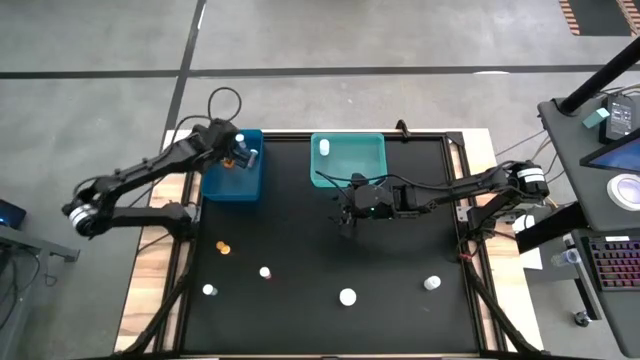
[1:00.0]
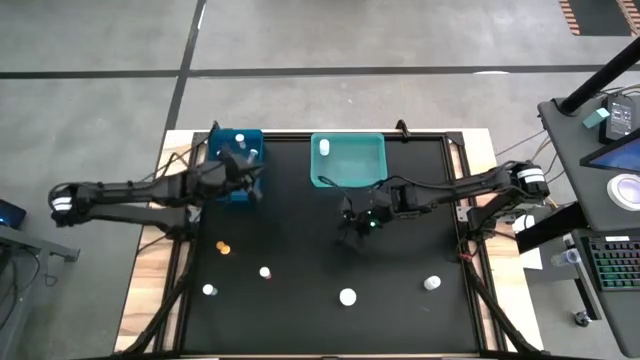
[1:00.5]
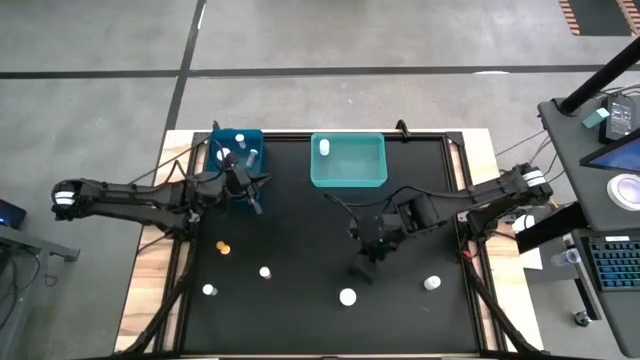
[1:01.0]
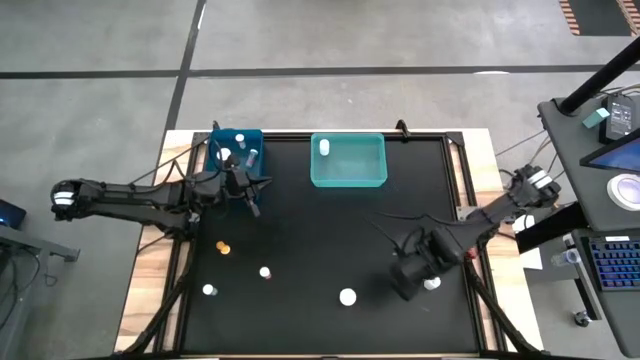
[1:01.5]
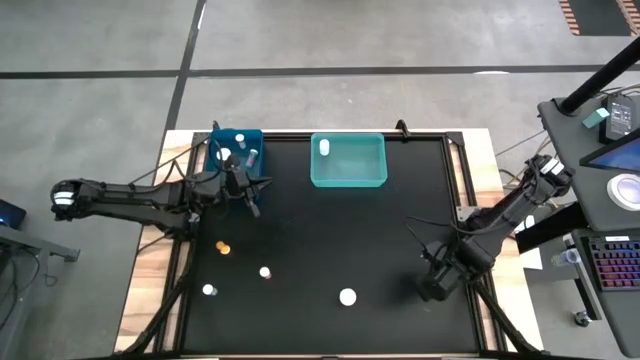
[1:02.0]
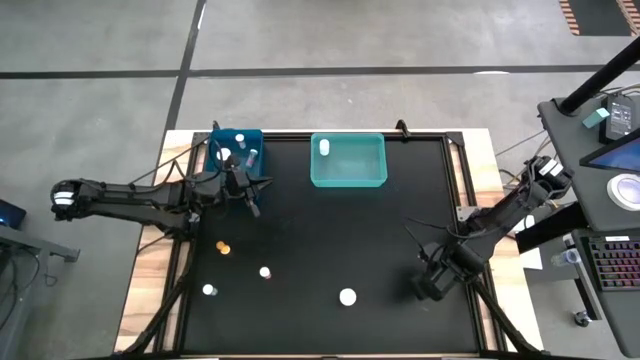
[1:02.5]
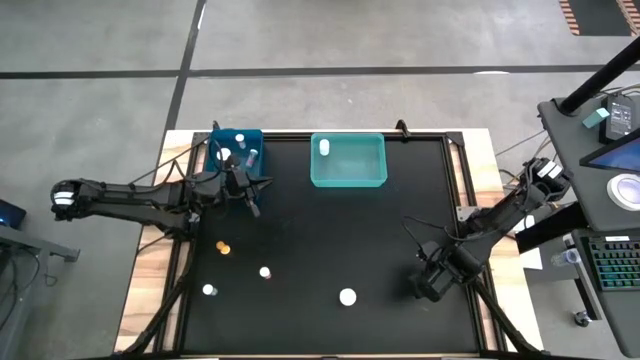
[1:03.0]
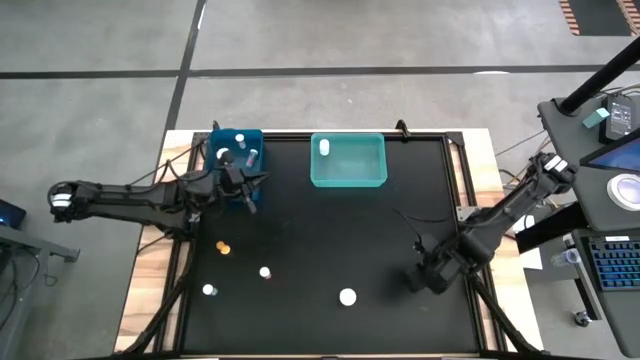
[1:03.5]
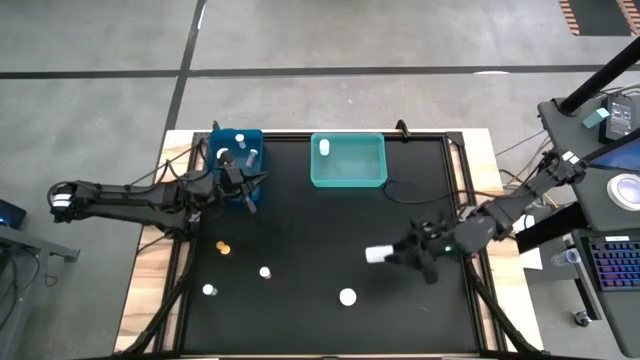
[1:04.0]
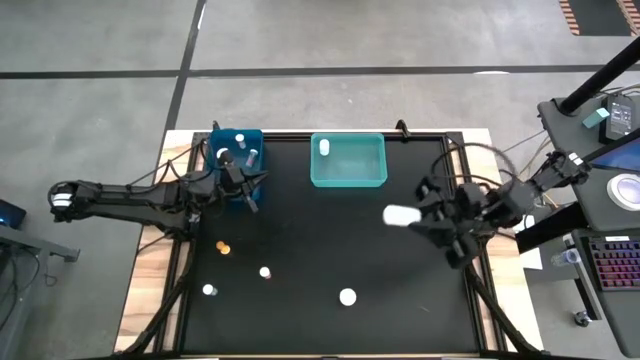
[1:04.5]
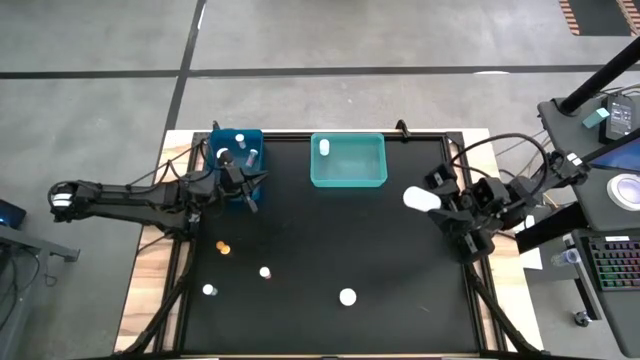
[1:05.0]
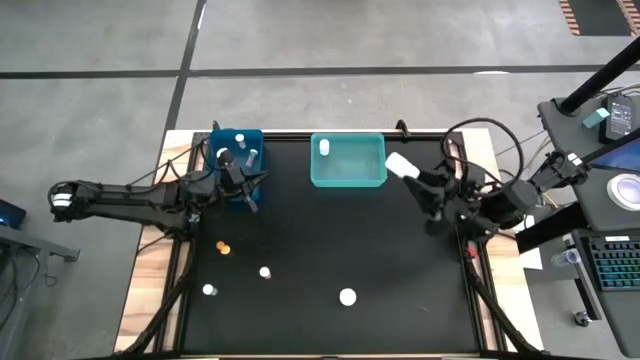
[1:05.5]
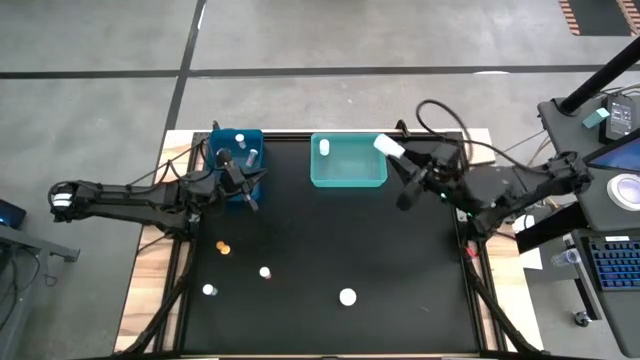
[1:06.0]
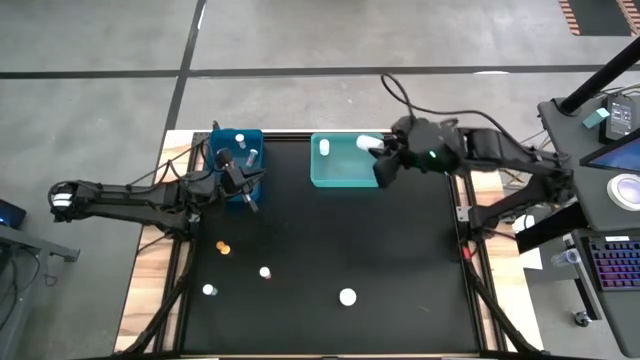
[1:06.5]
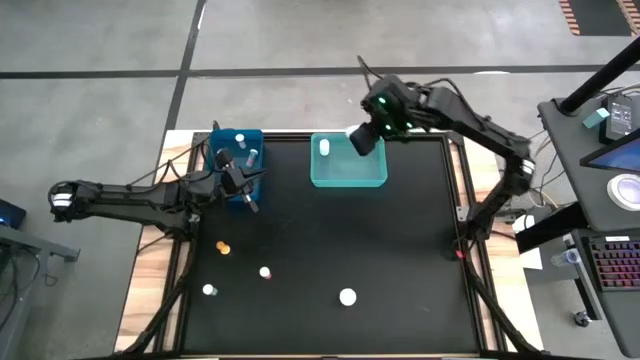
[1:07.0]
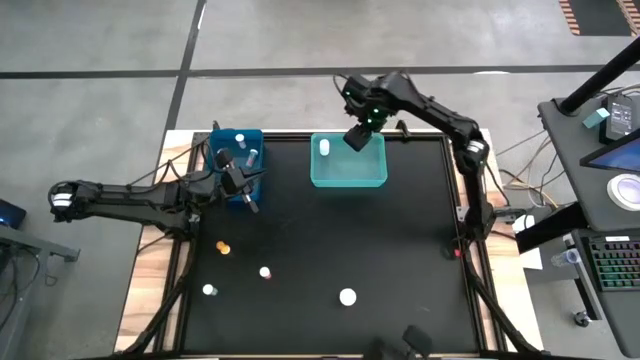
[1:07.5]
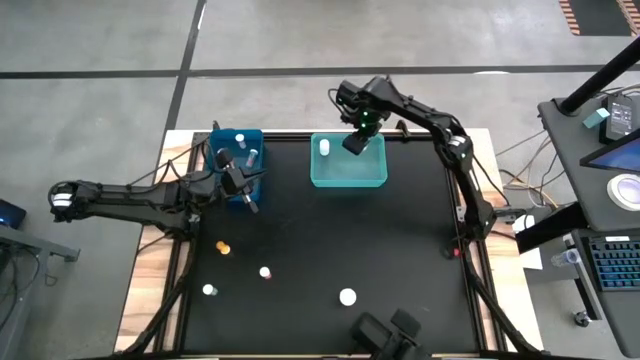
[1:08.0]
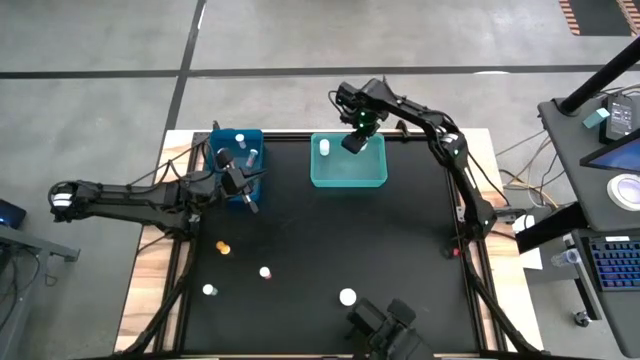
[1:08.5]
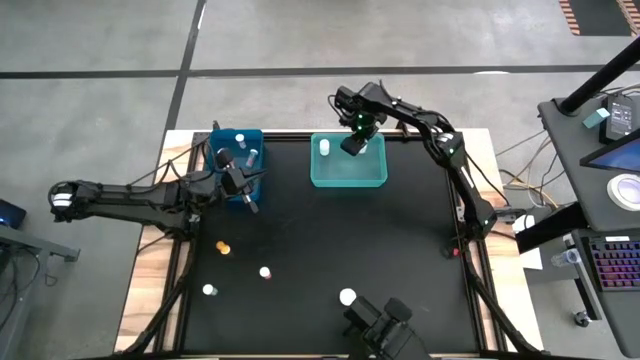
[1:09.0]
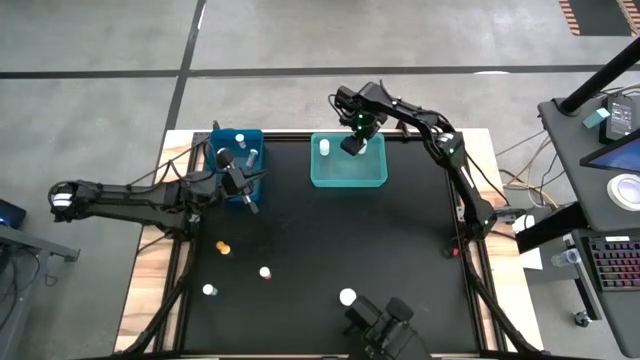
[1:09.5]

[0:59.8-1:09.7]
Task: Pick and place medicine bottles into bin by pill shape (circle, oval)
Put the white capsule bottle into the blue bin

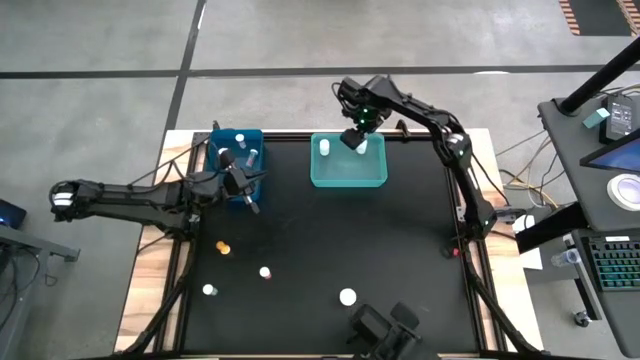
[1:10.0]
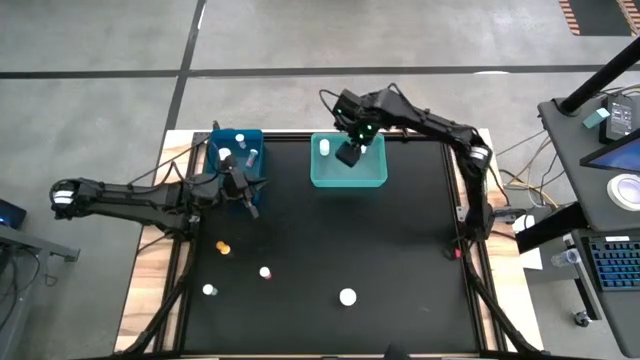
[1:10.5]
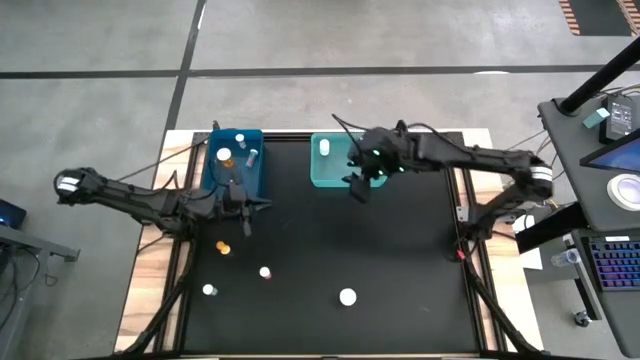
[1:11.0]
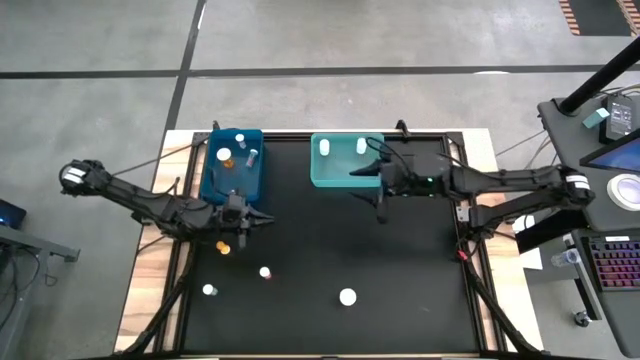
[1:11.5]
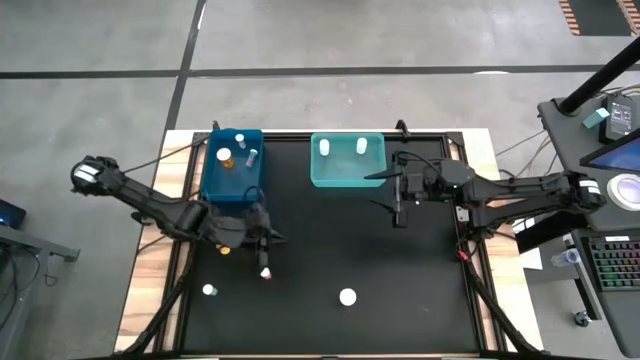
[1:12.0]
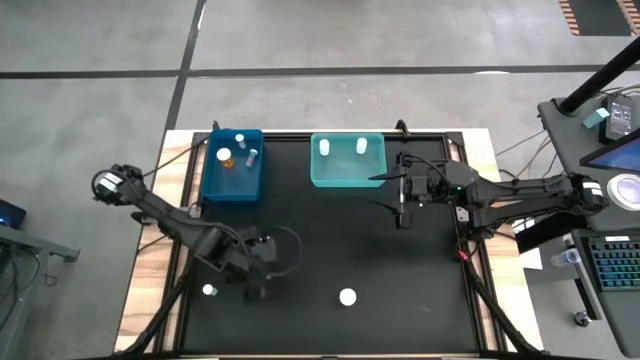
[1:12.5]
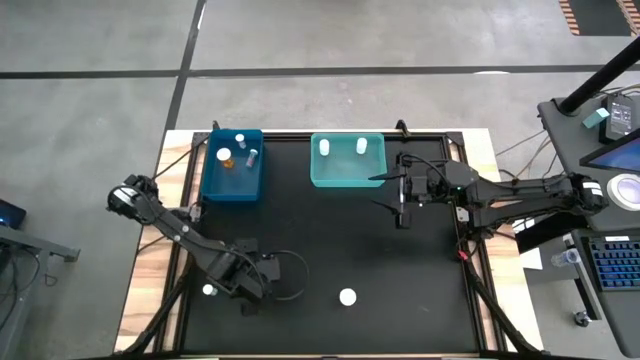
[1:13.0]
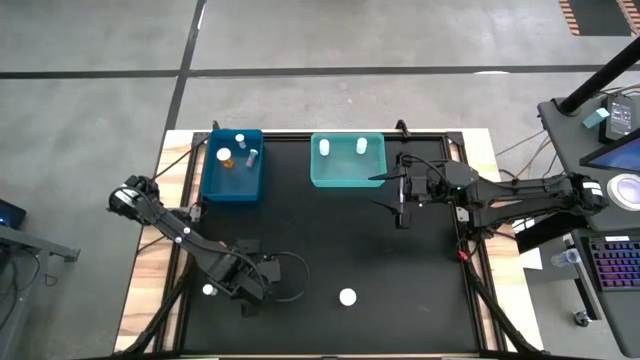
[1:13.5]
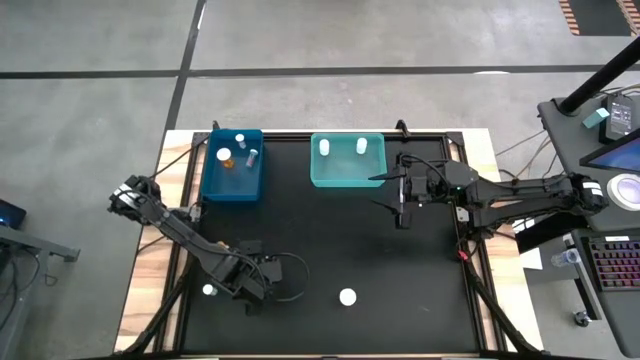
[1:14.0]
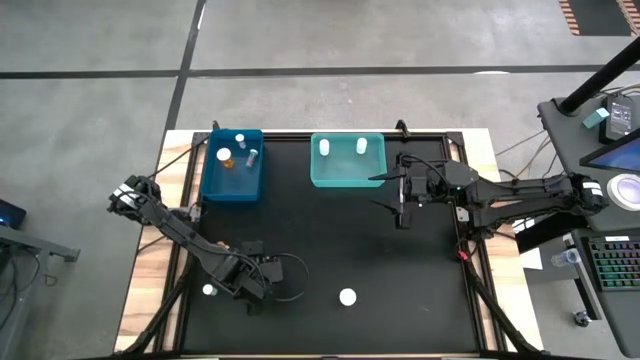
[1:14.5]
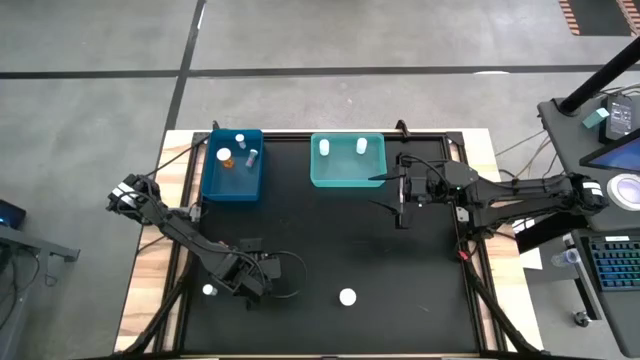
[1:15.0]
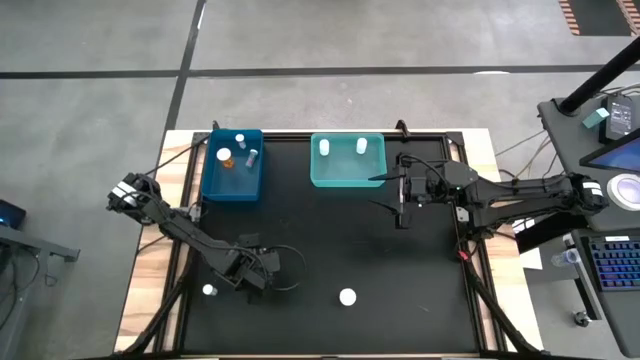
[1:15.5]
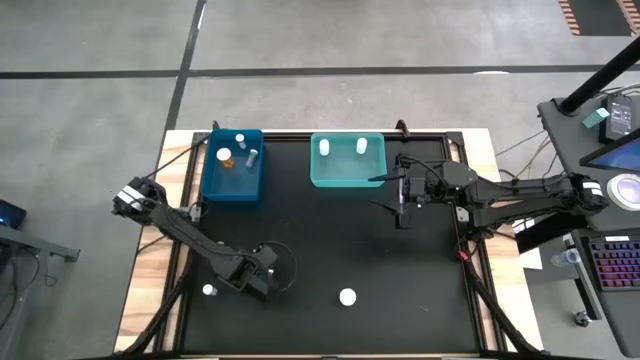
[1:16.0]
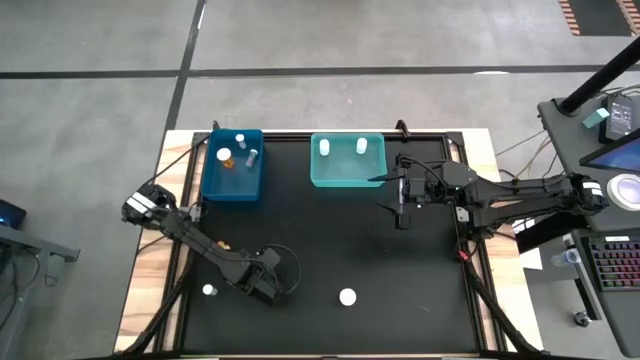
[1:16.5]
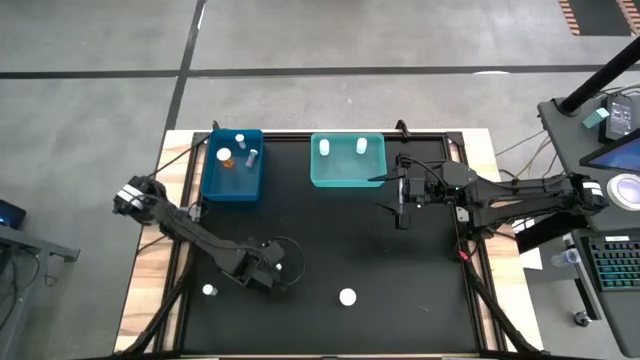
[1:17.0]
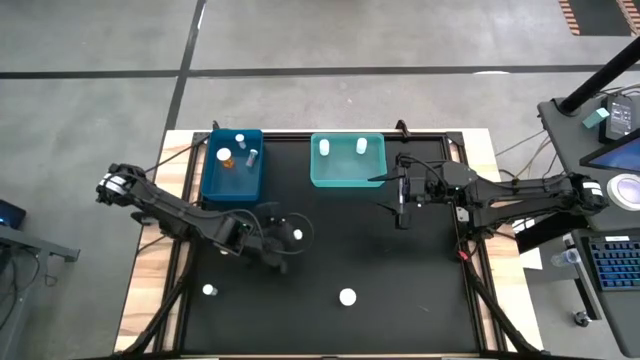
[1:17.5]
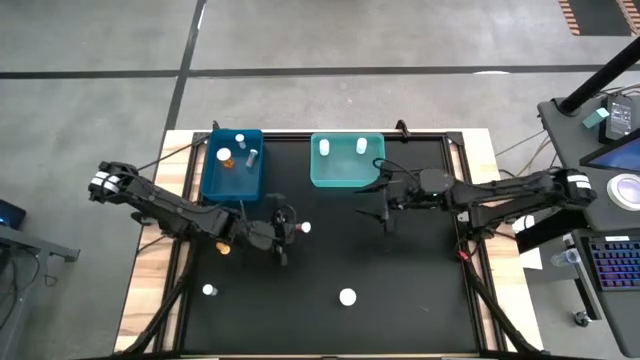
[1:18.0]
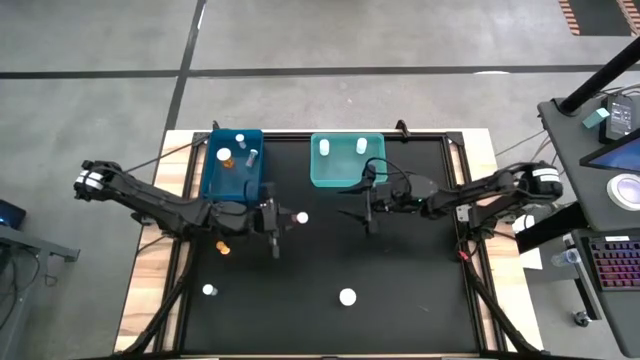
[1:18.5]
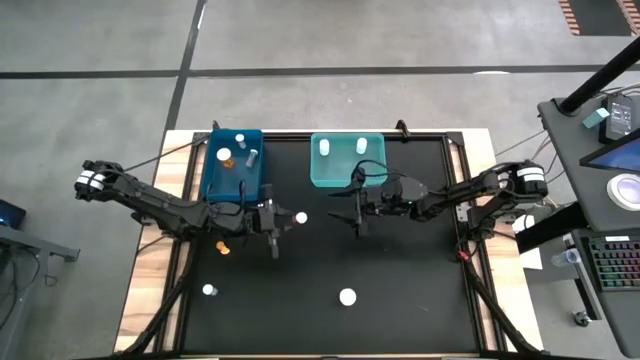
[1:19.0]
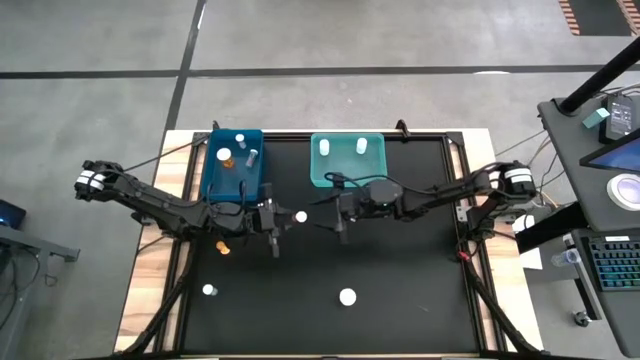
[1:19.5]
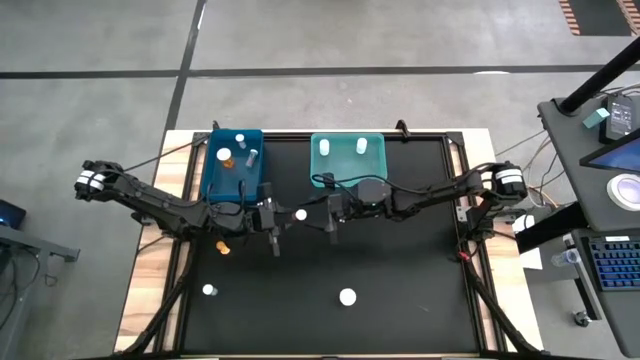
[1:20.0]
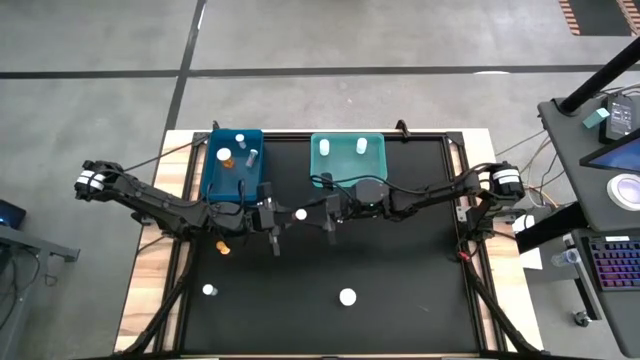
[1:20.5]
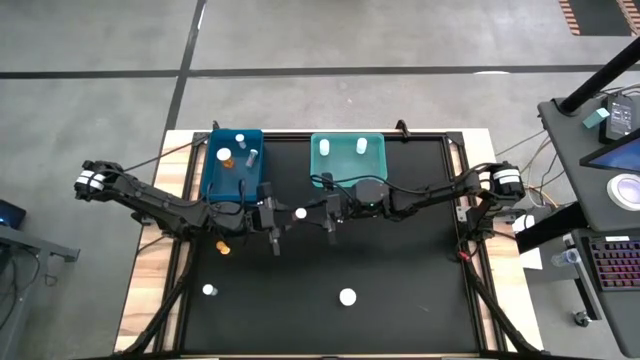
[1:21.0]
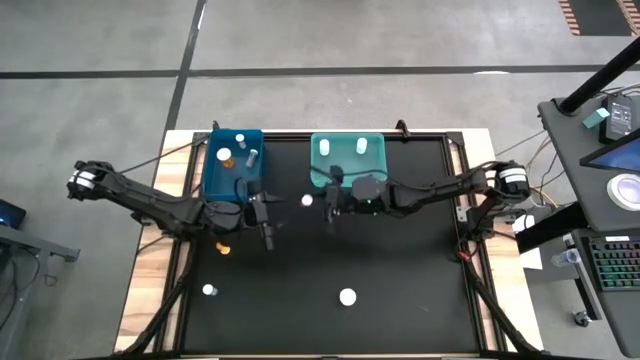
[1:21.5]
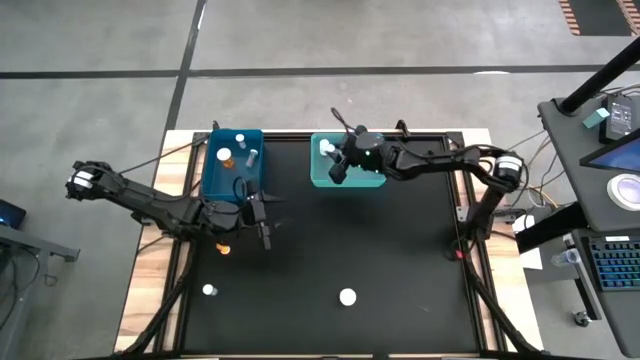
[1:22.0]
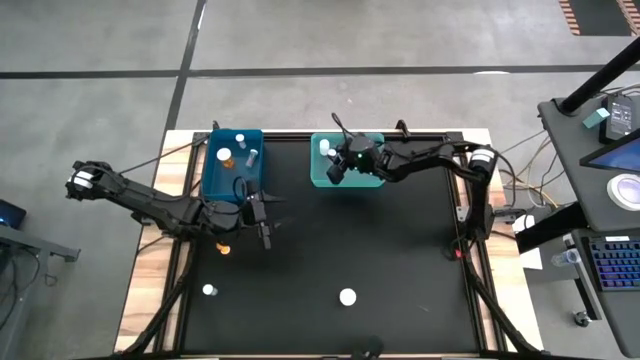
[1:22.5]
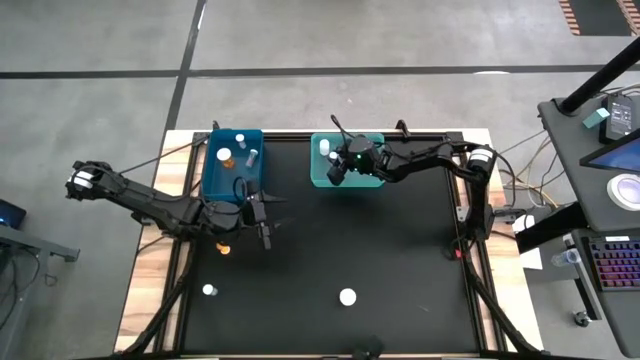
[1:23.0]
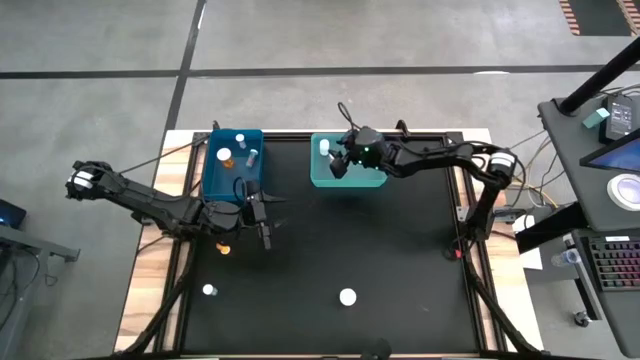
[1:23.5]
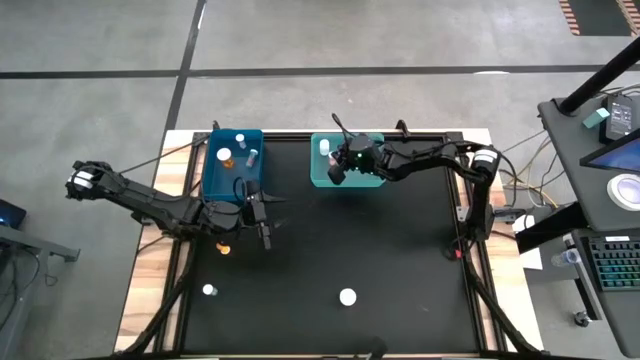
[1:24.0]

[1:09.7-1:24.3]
Put the pink tablet bottle into the light blue bin
